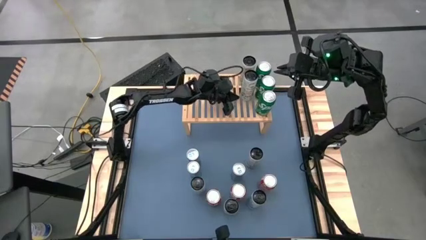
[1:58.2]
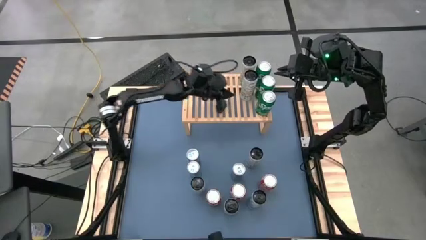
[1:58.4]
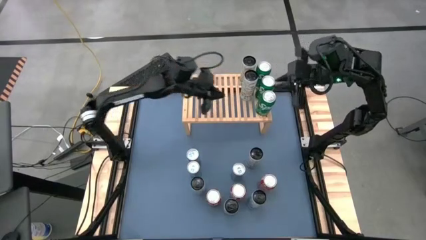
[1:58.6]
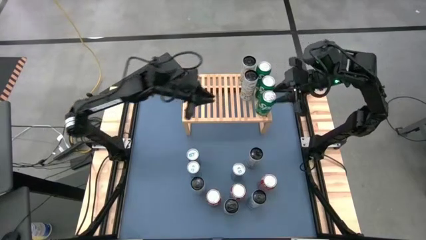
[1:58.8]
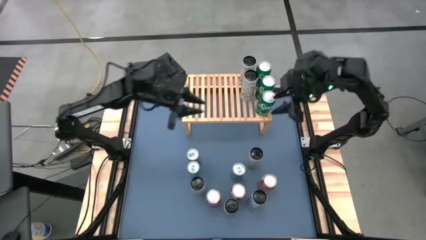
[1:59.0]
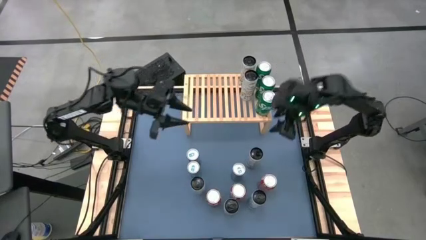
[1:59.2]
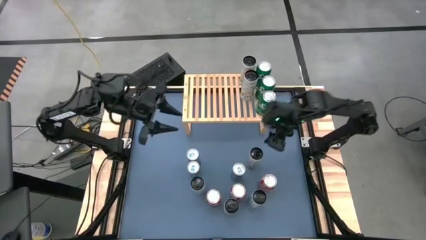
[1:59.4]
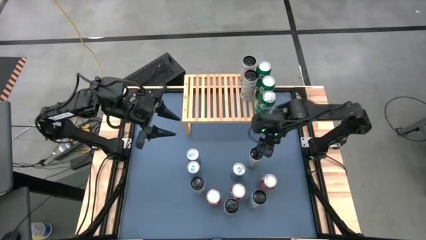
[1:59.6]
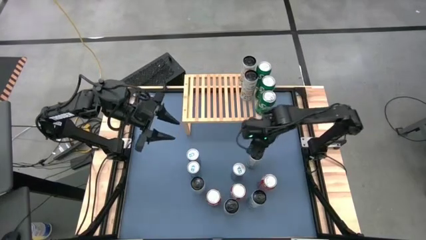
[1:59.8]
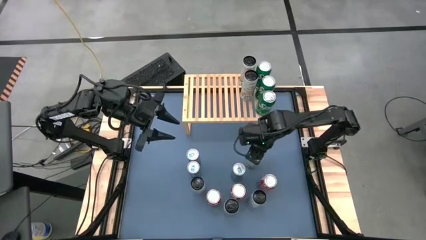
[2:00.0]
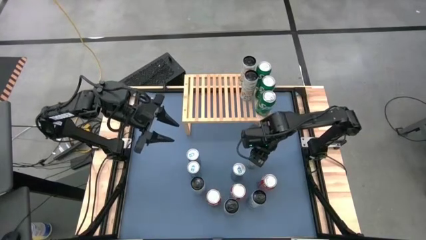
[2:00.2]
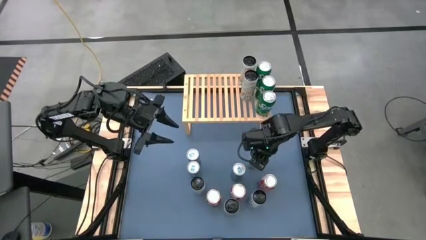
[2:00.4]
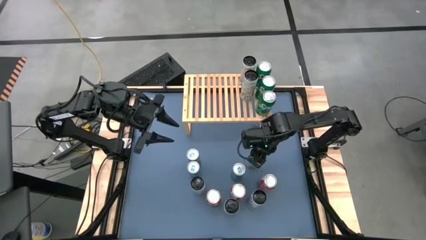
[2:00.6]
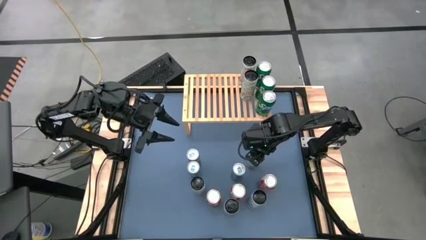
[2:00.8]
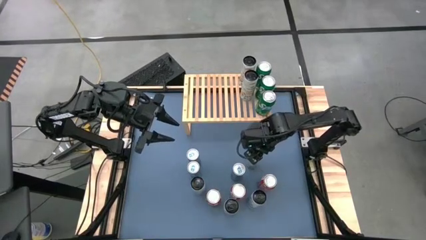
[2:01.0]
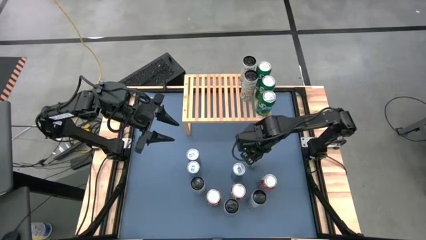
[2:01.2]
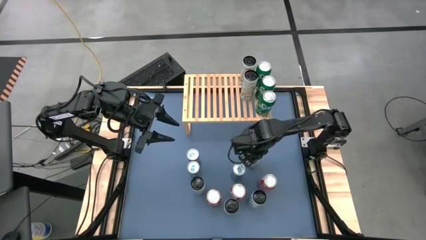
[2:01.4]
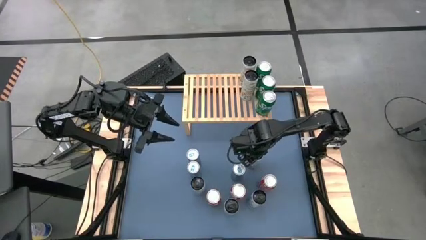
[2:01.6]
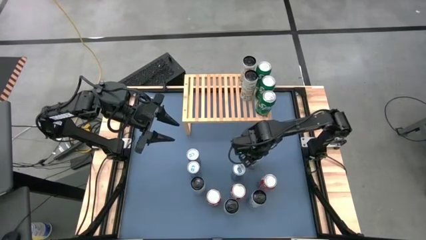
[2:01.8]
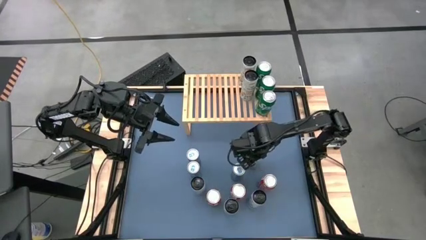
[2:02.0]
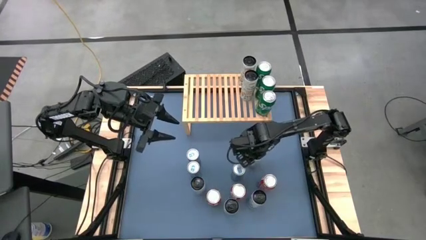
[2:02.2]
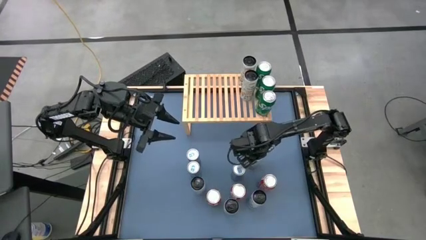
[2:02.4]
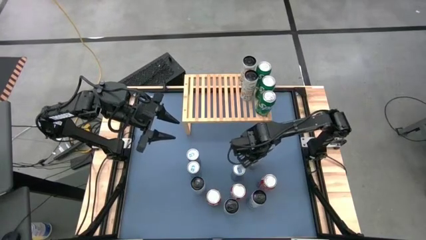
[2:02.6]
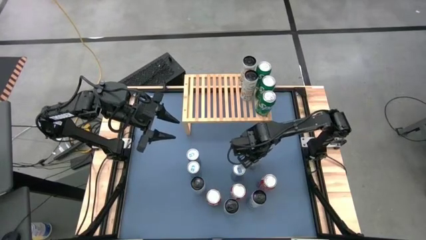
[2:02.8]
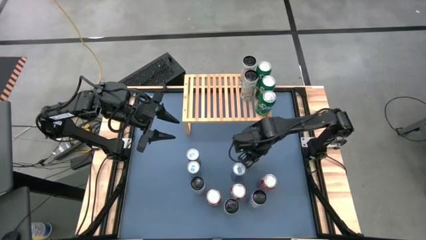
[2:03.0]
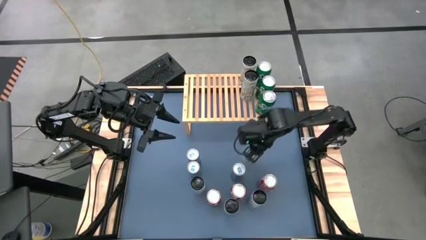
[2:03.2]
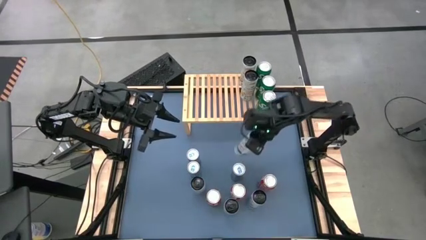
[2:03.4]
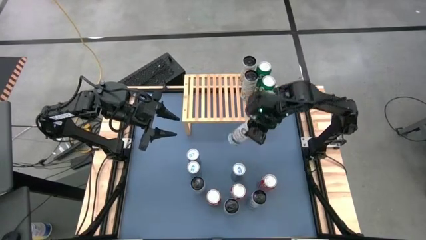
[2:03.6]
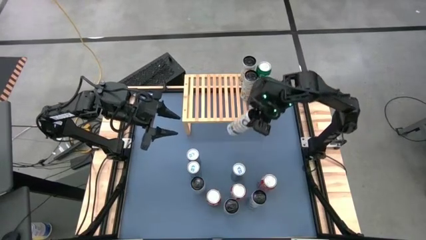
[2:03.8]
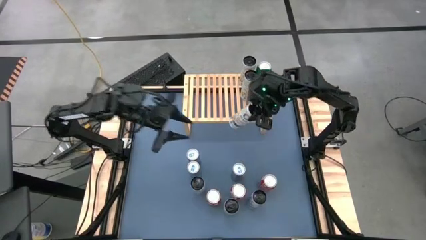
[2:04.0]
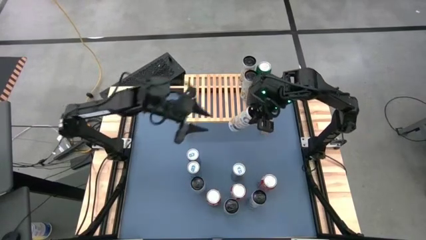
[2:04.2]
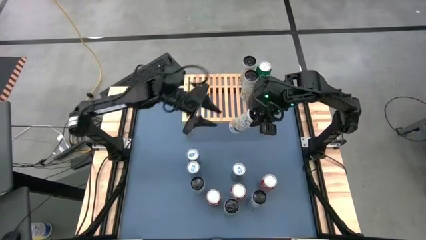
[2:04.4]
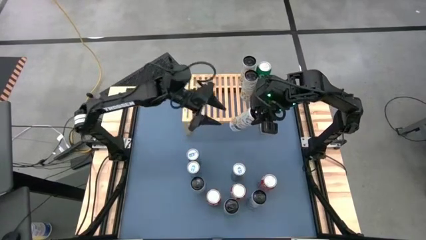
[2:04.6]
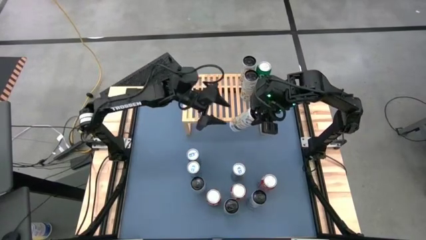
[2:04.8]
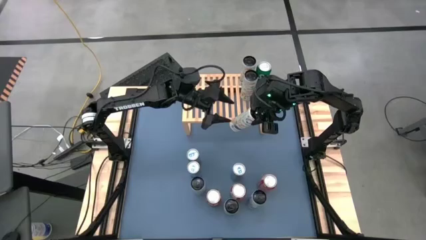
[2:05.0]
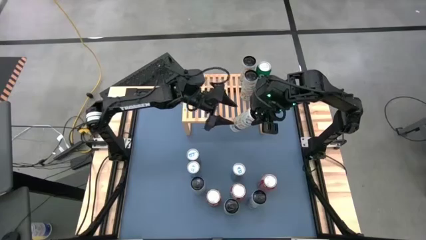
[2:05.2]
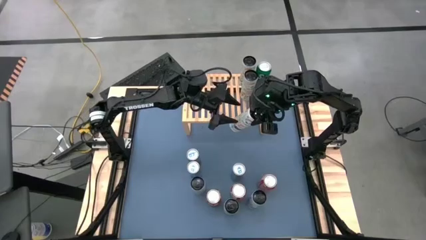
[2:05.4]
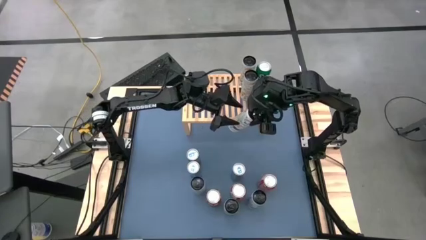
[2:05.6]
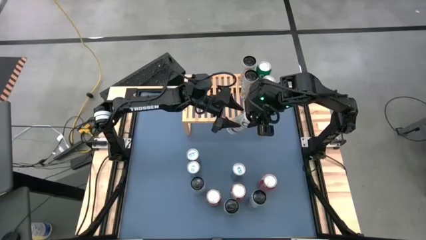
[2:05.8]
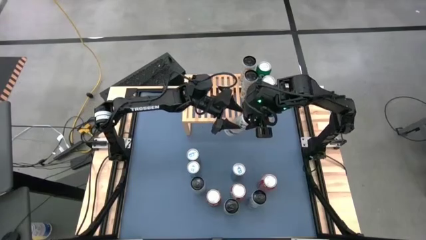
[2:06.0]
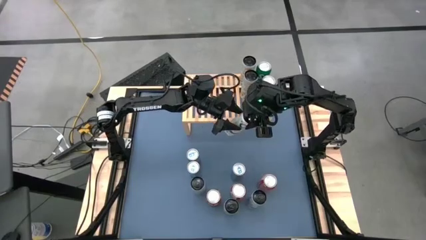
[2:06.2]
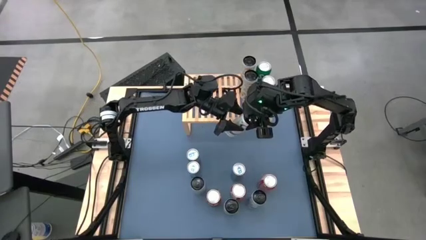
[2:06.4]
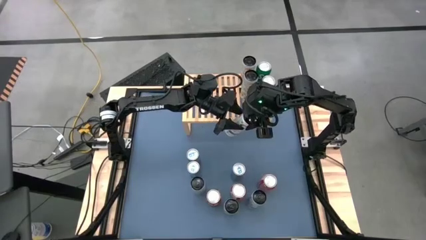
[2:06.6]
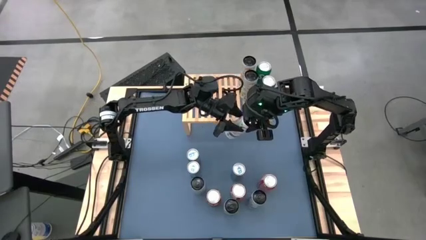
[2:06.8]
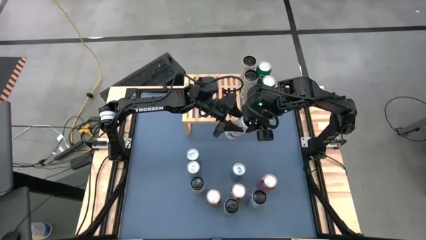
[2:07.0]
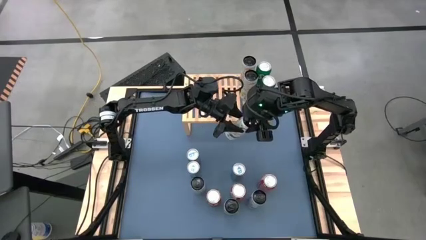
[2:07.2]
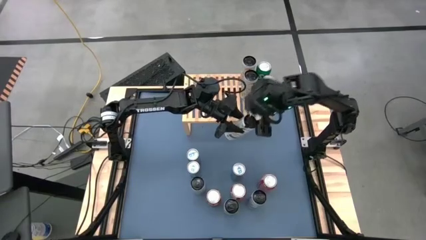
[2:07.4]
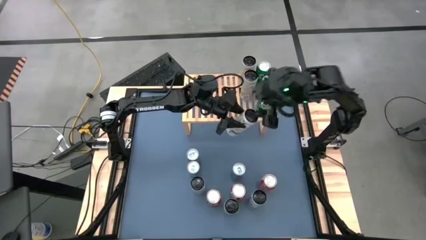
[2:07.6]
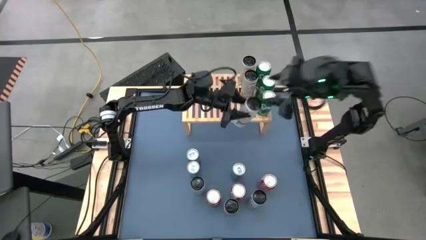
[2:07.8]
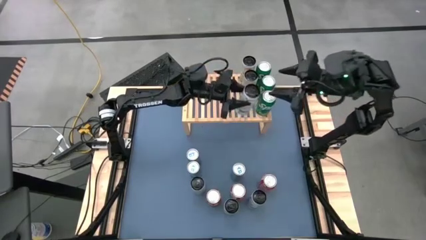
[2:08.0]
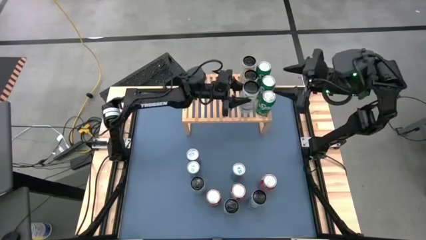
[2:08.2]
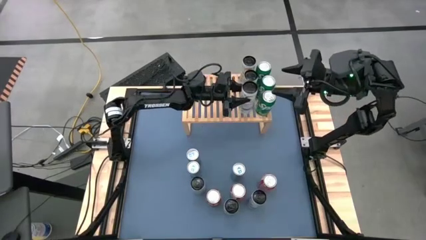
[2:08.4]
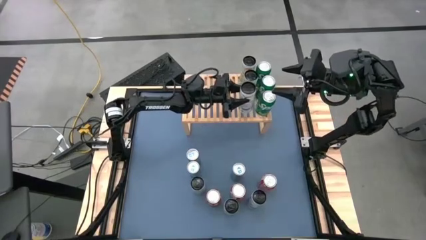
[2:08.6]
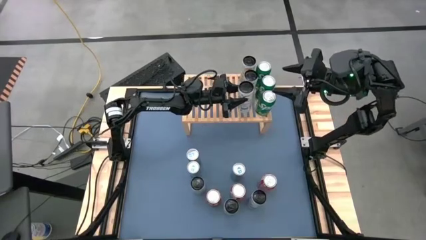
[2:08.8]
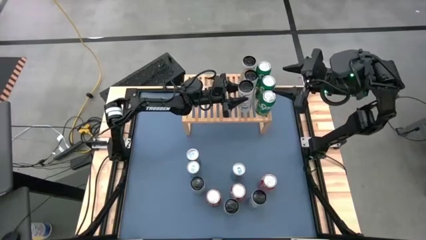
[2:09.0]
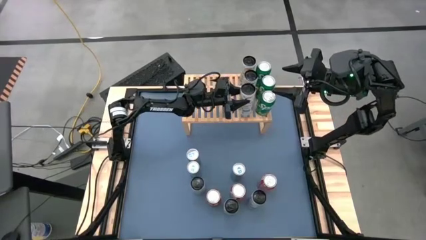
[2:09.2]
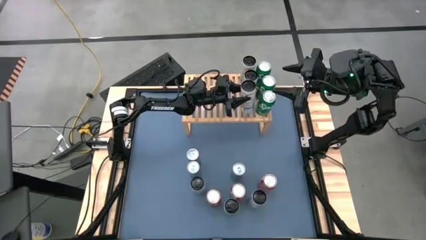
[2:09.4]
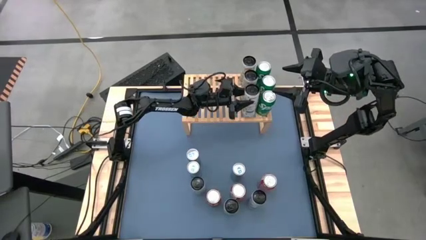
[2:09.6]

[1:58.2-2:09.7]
Task: Place canned beverage on shelf
Put the white-yellow soda can on the shelf aligned with the other white-yellow soda can

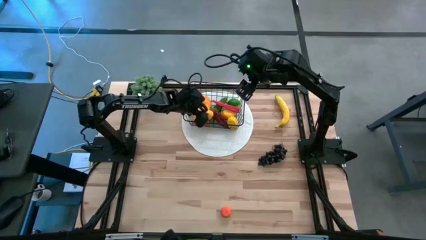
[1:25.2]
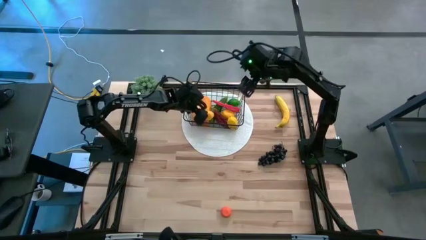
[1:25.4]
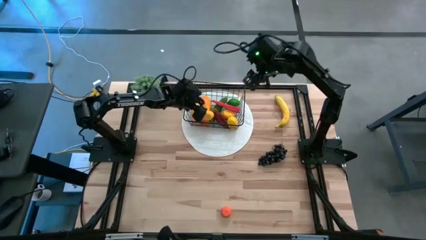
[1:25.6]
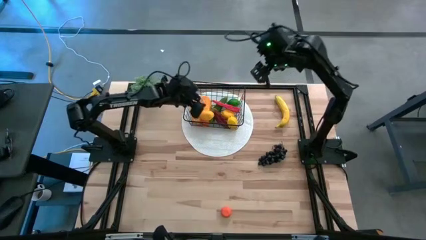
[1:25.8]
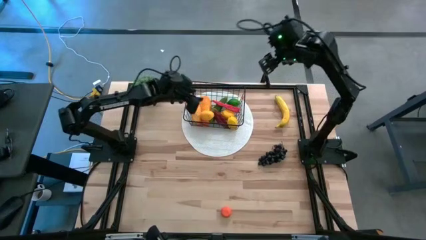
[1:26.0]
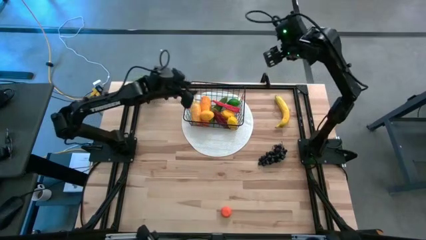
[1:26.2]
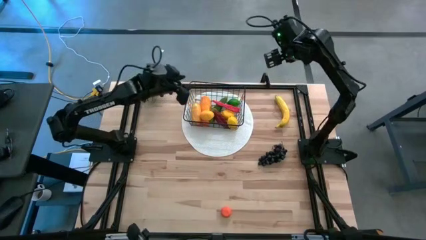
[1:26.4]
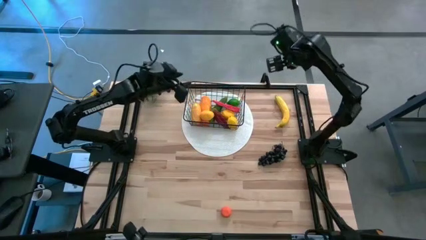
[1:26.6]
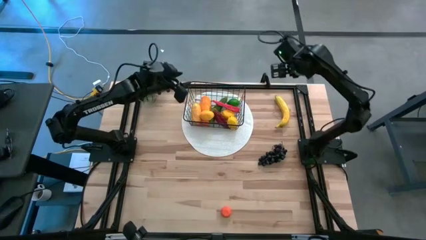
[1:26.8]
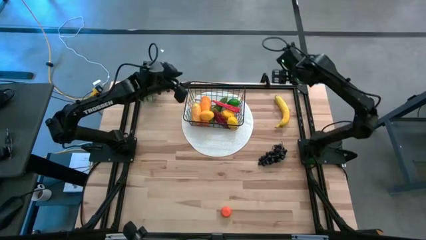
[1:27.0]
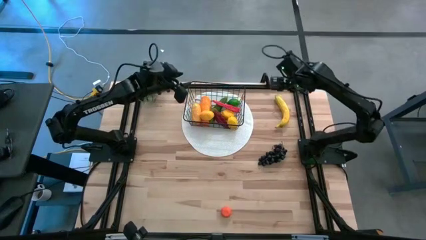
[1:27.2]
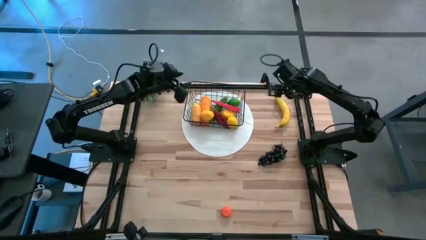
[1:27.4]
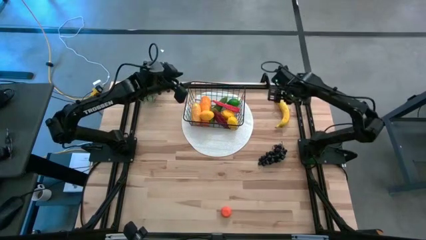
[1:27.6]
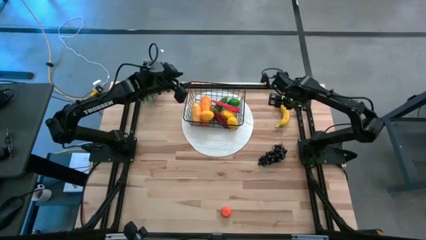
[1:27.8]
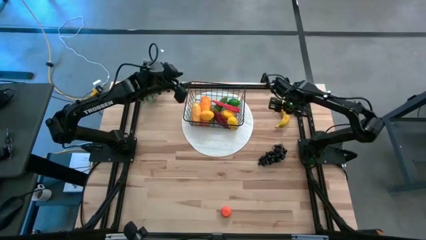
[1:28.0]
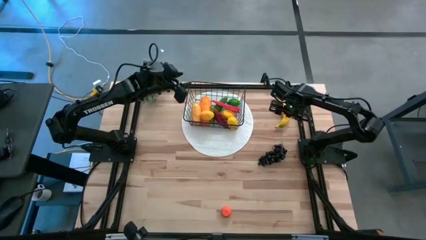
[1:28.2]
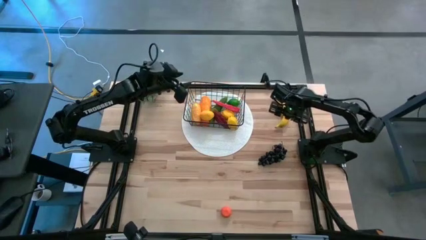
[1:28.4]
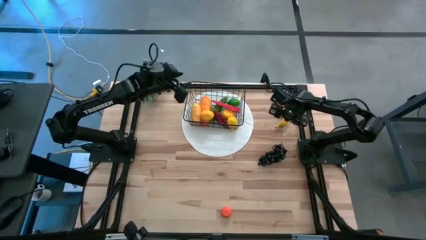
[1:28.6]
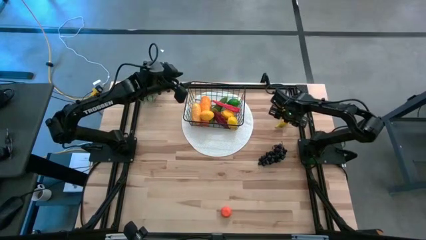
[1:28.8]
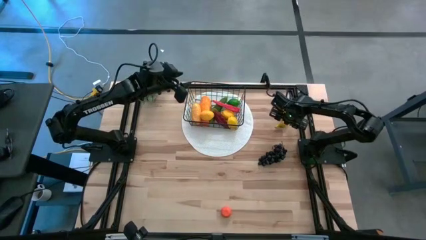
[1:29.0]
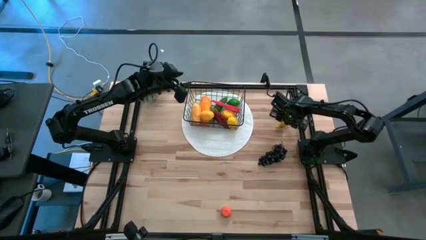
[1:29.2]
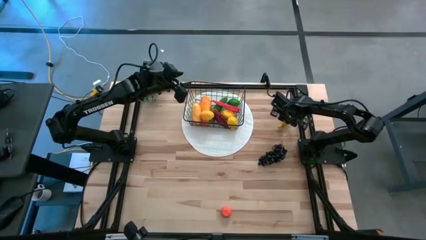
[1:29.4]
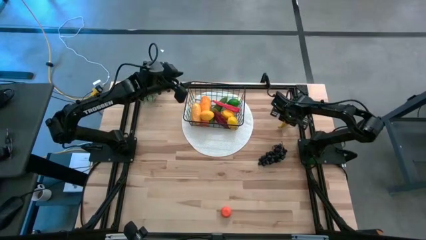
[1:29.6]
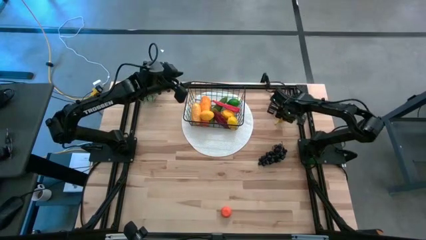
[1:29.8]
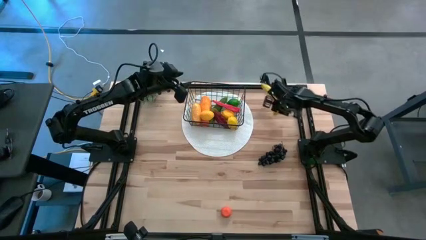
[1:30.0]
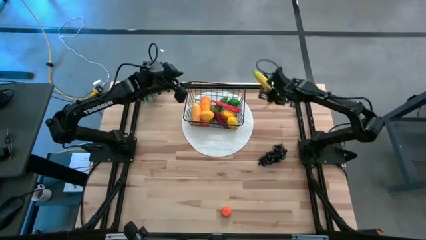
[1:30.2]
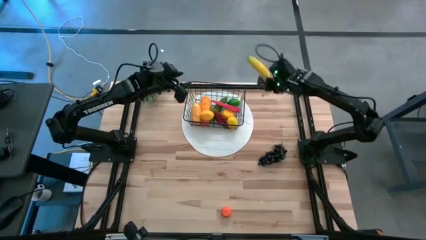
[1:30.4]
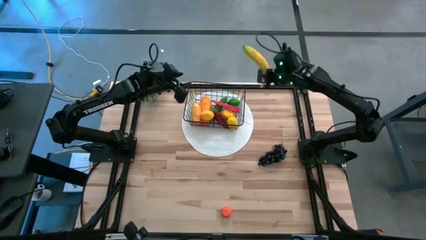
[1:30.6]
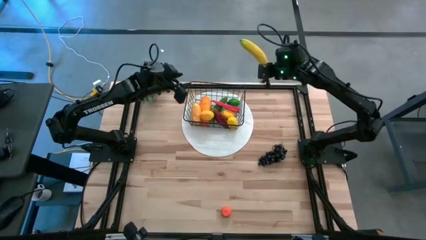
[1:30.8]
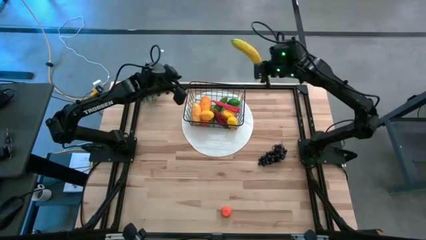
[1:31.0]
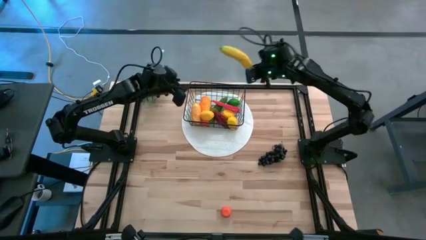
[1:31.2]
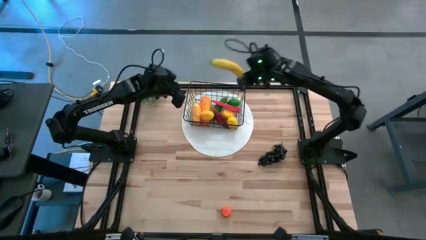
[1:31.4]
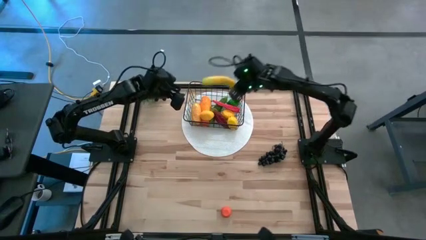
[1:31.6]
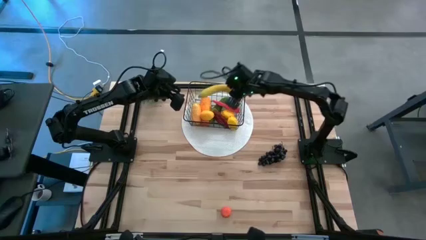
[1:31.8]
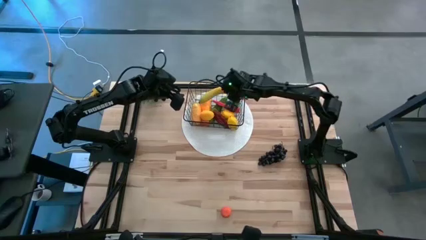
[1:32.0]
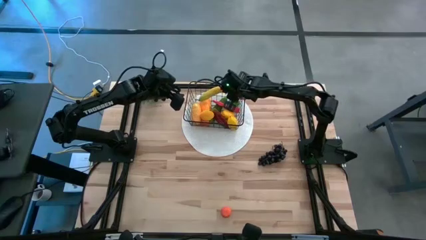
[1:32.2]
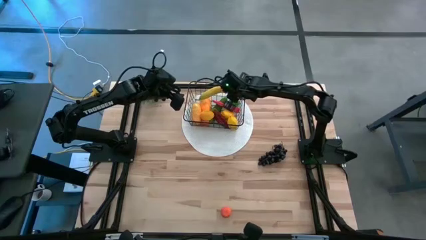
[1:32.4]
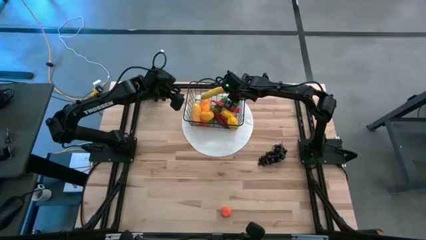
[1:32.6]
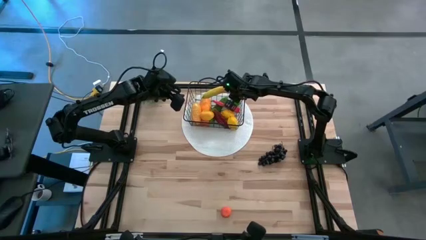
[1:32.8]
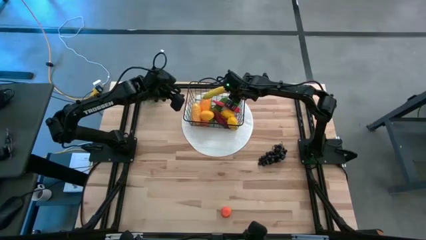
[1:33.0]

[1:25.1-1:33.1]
Task: Build produce basket
Put the banana into the wire basket
